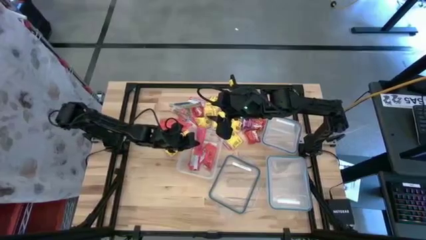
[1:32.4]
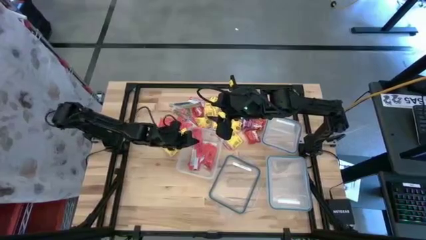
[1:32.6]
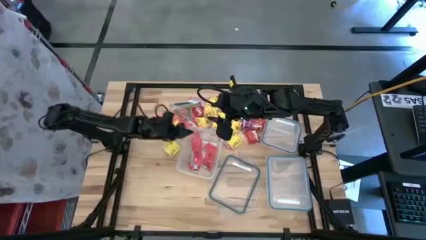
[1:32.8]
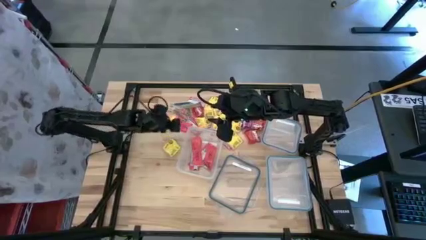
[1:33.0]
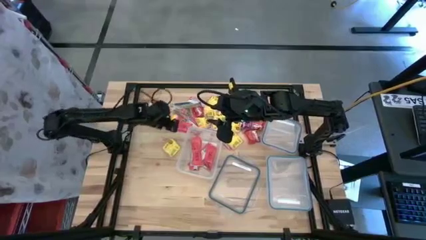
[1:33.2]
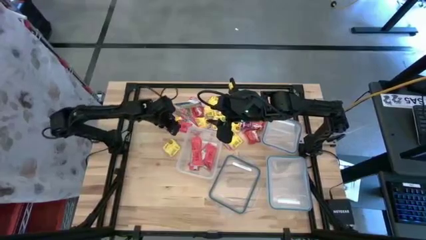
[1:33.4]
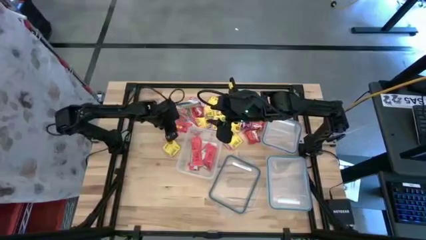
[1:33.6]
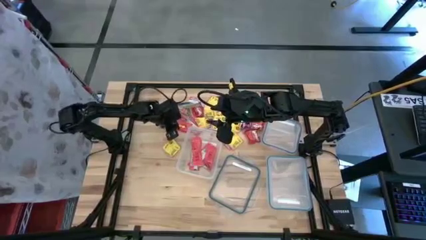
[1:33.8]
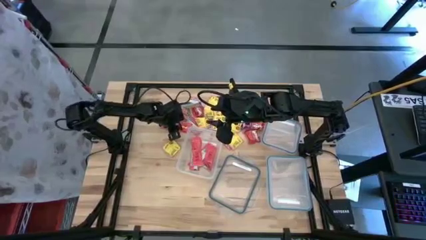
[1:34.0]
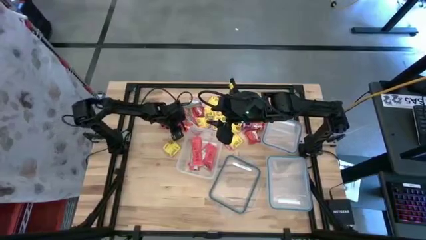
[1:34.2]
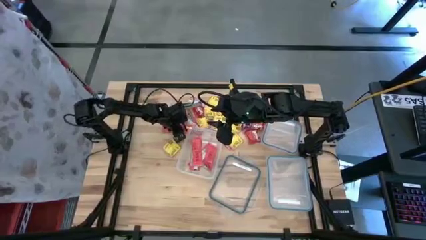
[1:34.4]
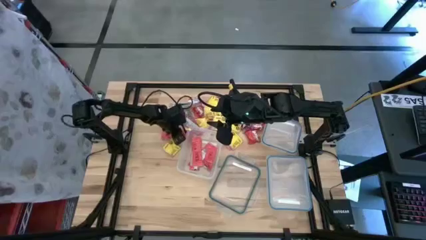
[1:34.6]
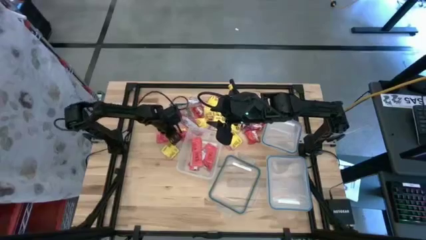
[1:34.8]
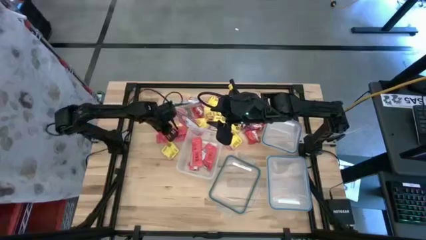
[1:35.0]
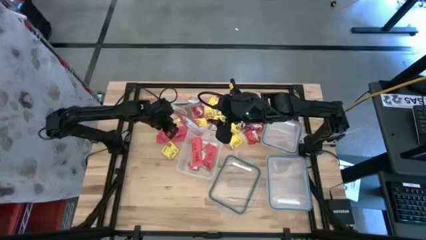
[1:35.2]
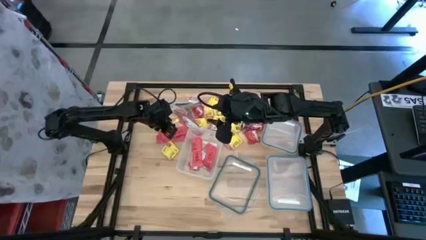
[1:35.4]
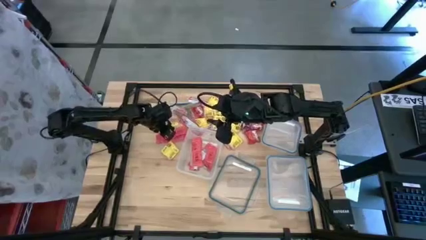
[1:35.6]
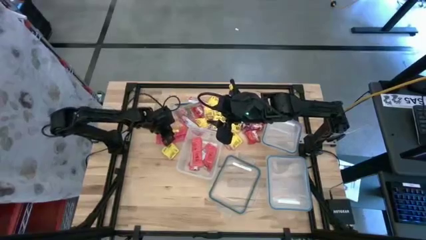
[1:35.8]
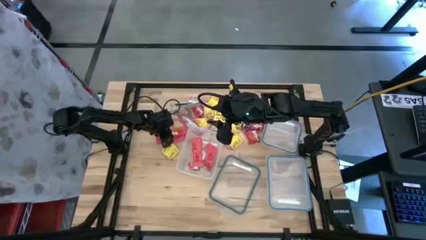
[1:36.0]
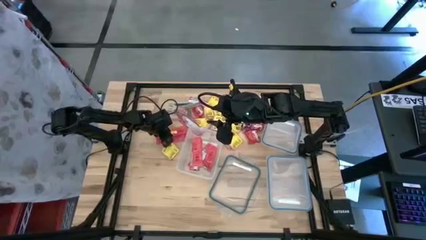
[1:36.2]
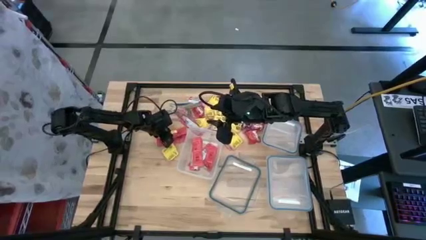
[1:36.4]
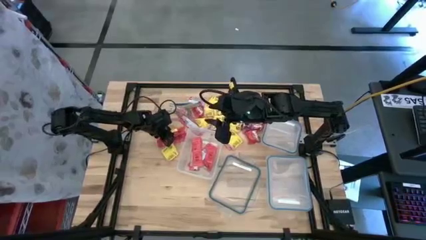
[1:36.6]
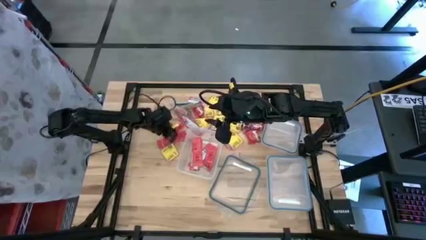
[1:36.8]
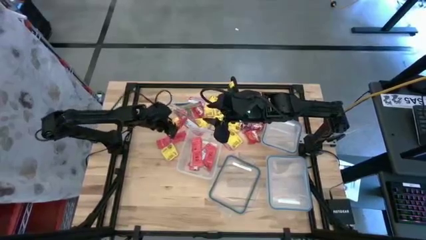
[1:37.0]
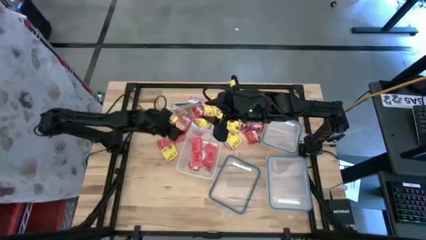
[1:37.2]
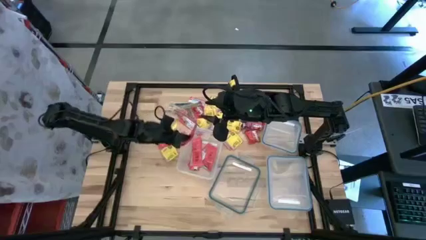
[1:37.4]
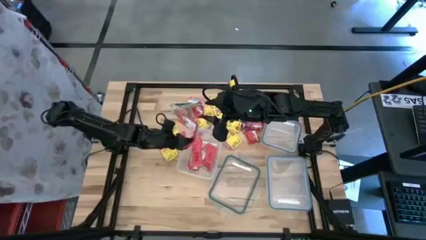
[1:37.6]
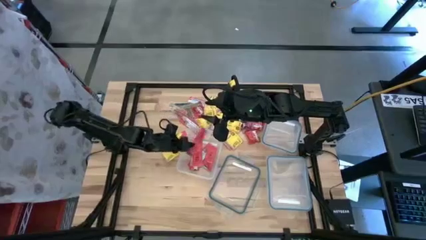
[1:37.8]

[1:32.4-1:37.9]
Task: Sort candy
Put the red candy strip into the rectangular transparent bin

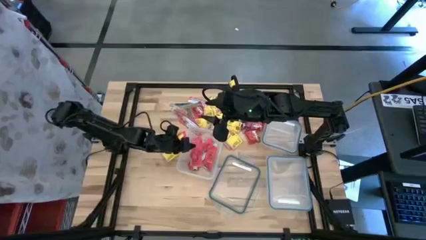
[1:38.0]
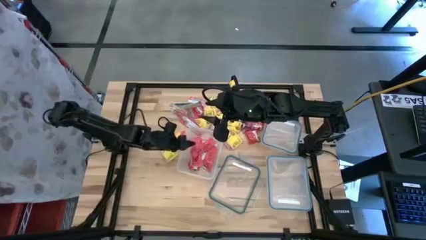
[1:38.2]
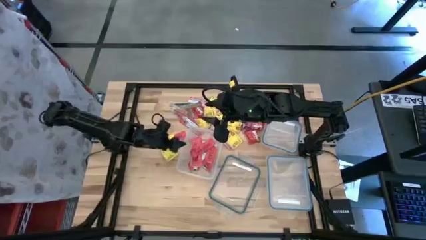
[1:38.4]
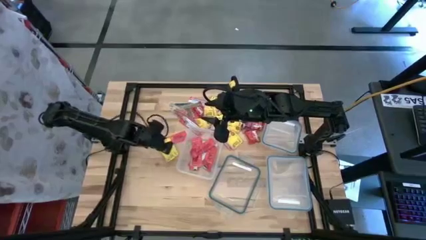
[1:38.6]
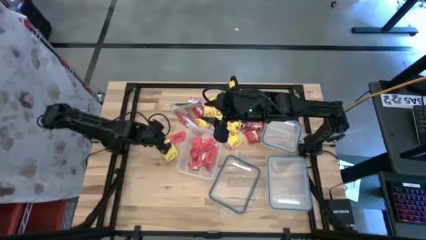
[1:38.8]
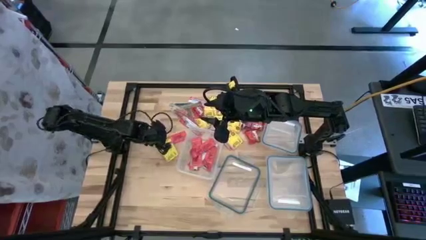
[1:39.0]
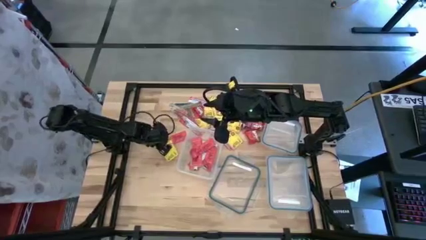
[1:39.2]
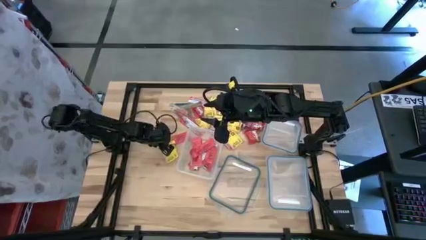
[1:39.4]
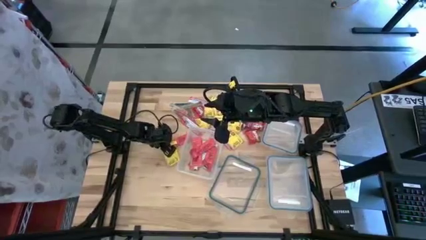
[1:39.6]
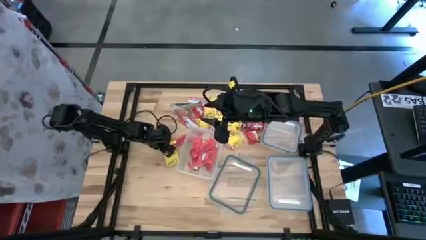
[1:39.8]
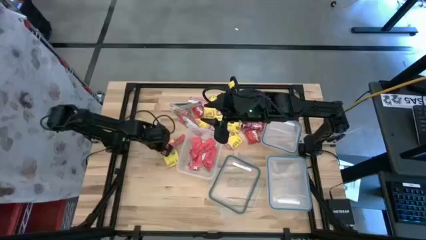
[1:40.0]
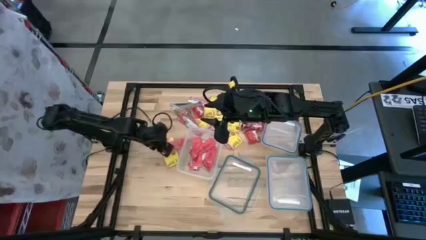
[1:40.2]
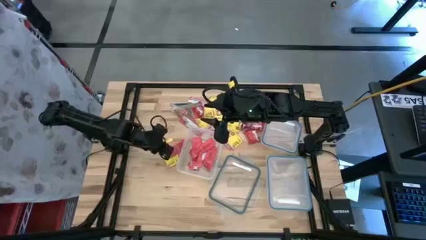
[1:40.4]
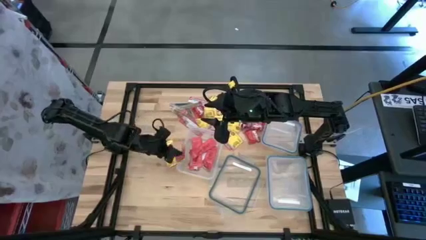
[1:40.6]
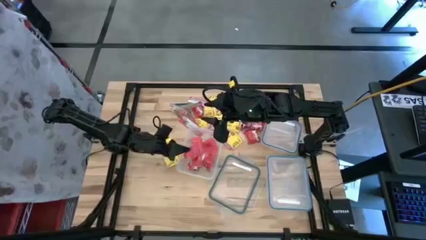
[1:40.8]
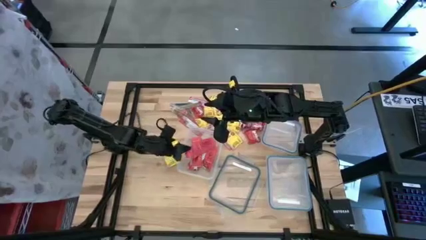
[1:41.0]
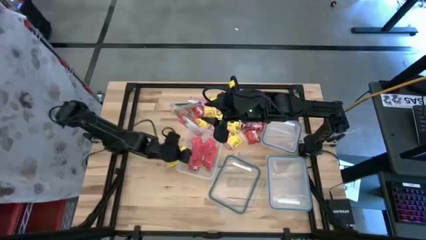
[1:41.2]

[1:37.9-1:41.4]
Put the red candy strip into the rectangular transparent bin

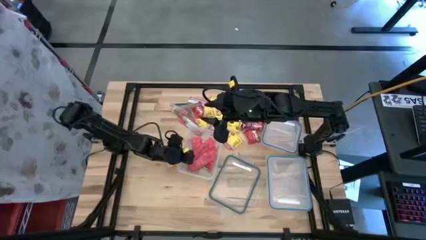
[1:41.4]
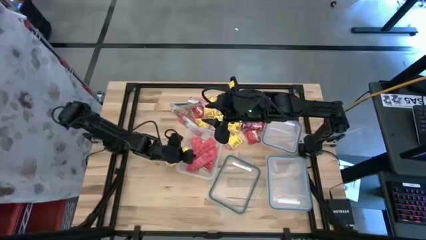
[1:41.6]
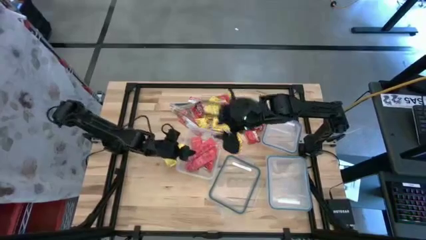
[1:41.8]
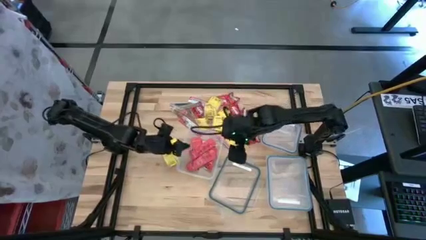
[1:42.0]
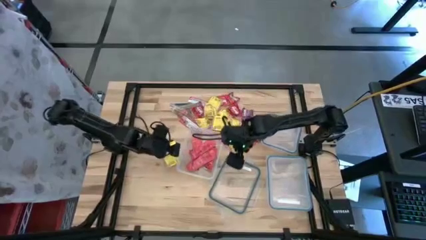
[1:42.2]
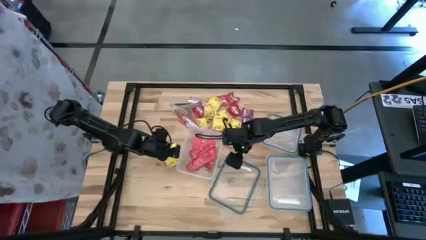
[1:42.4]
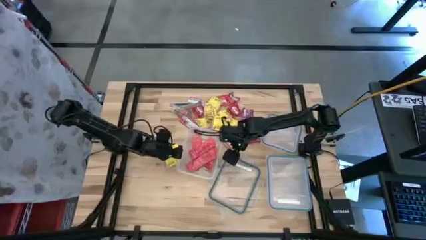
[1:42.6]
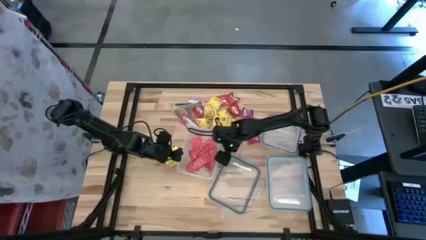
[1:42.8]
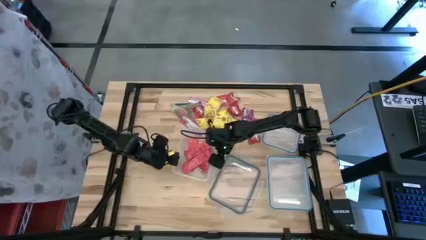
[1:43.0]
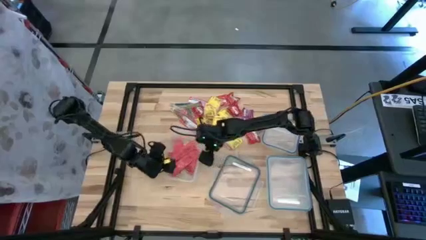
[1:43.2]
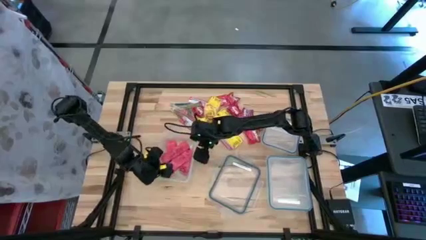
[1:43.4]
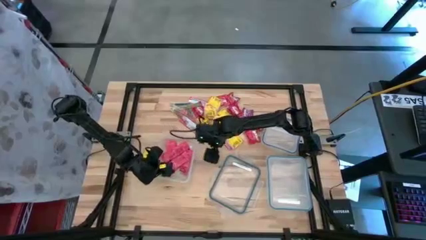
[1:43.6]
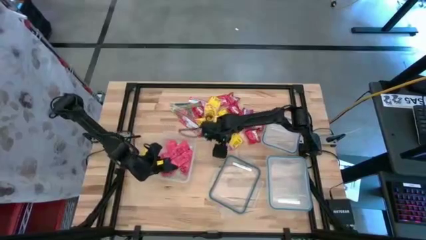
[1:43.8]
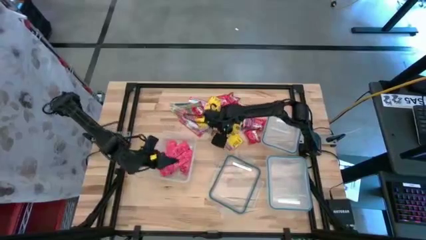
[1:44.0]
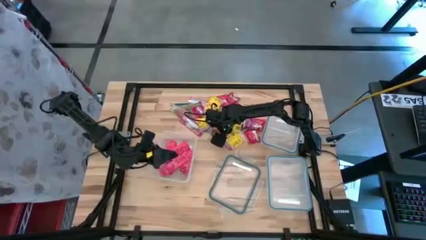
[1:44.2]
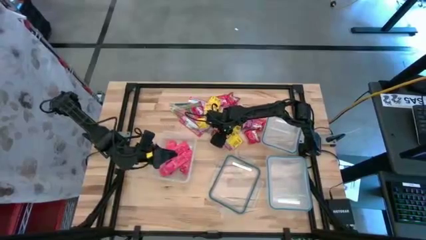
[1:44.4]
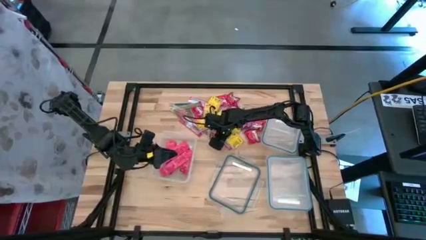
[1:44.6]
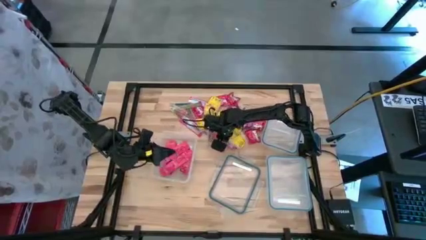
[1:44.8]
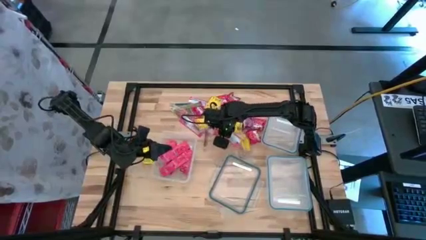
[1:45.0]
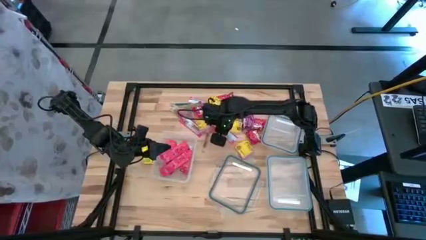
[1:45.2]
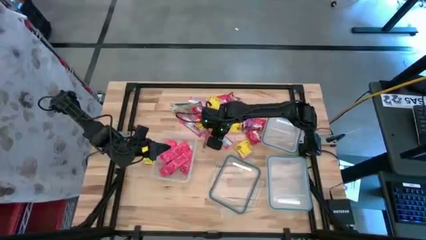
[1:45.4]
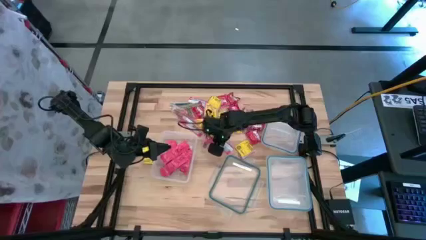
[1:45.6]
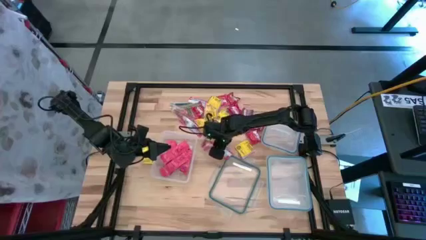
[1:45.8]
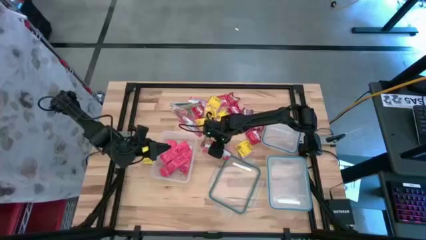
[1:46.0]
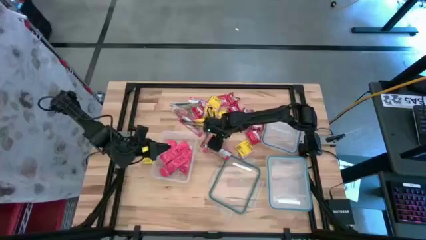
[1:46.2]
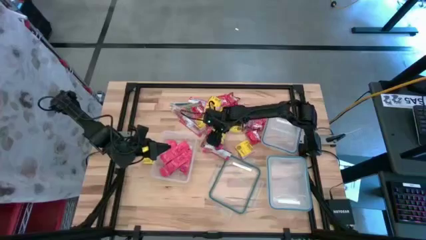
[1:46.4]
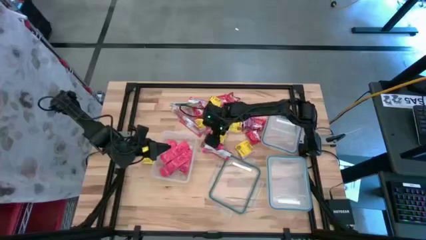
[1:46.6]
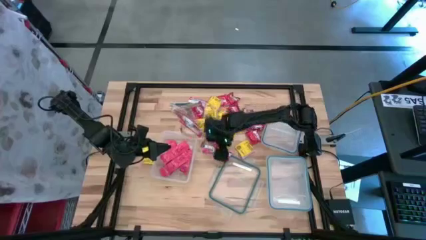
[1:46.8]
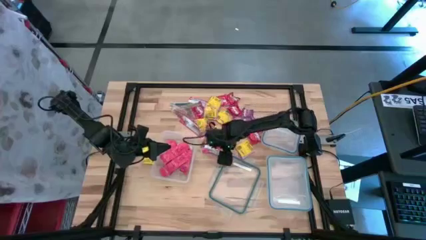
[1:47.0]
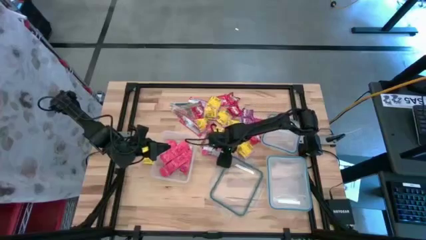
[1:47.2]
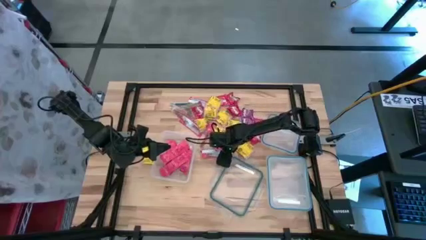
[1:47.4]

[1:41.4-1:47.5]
Put the red candy strip into the rectangular transparent bin

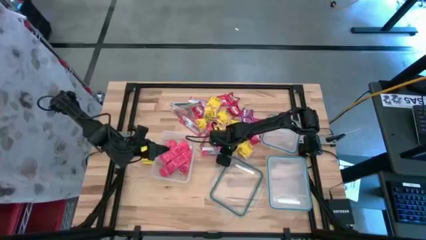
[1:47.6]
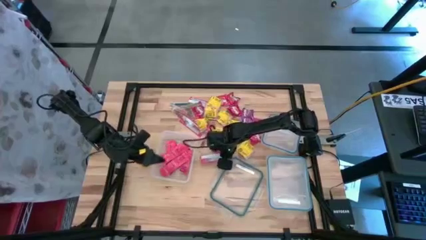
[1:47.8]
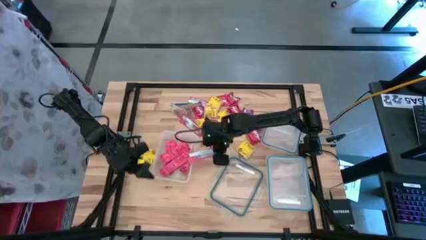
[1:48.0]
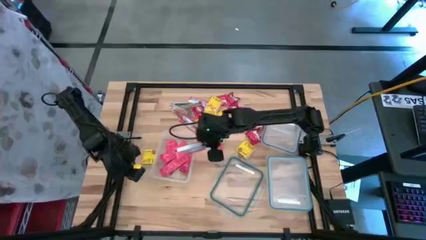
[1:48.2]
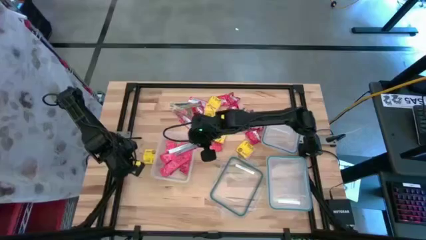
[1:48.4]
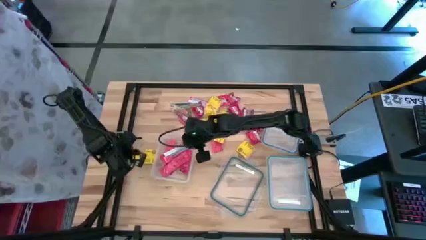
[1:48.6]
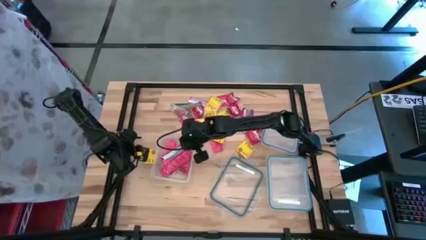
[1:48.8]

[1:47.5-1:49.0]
Put the red candy strip into the rectangular transparent bin
